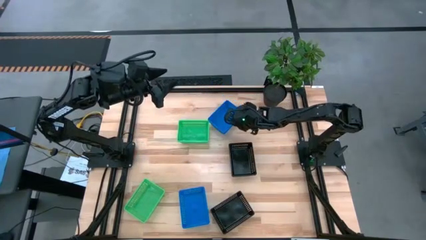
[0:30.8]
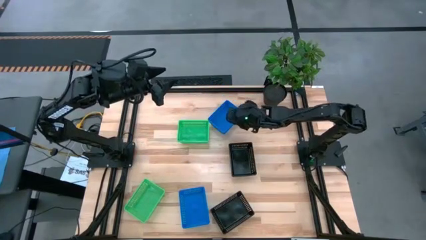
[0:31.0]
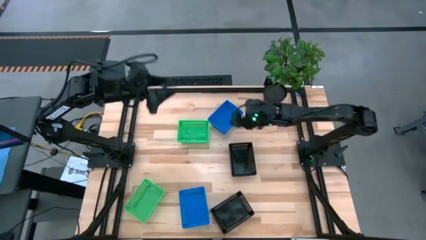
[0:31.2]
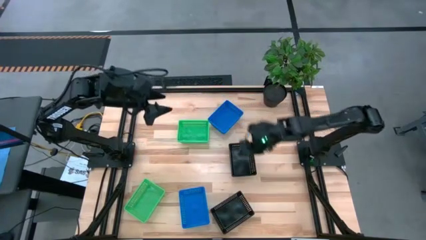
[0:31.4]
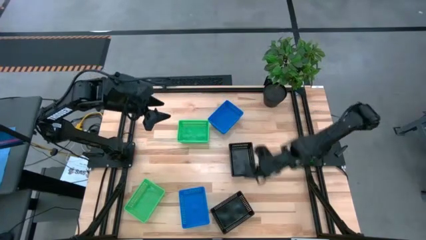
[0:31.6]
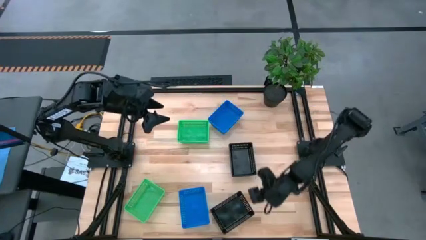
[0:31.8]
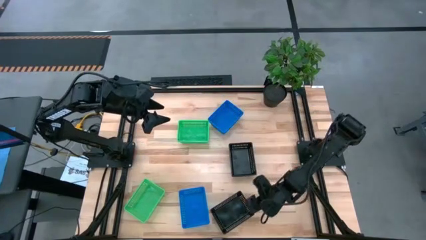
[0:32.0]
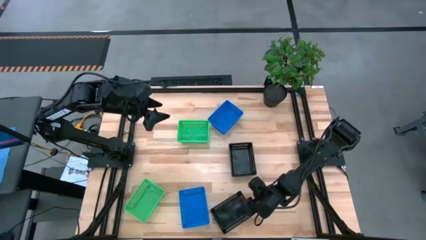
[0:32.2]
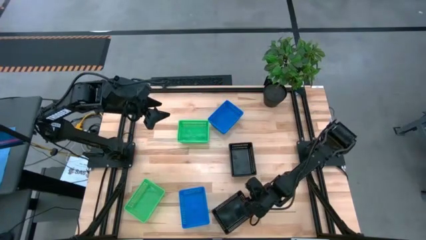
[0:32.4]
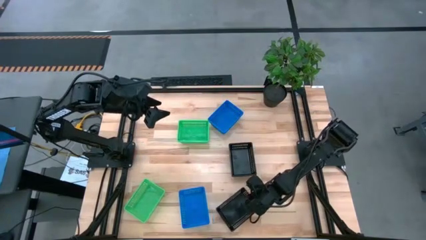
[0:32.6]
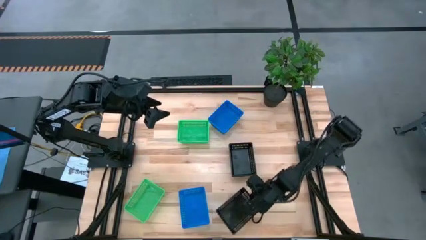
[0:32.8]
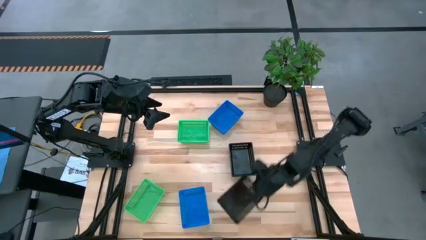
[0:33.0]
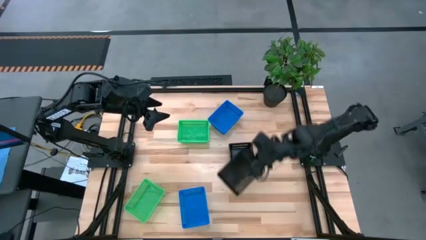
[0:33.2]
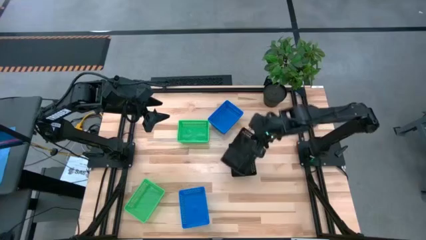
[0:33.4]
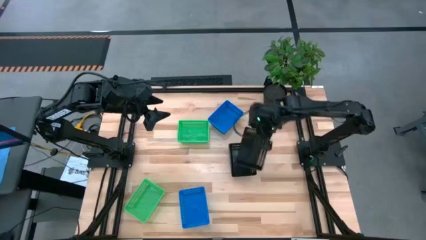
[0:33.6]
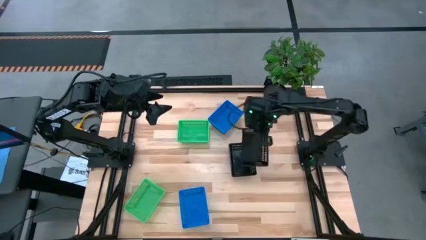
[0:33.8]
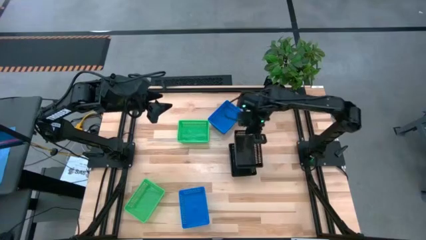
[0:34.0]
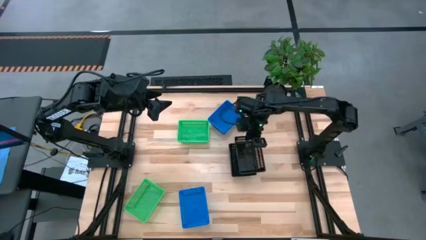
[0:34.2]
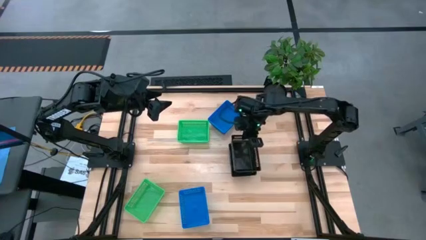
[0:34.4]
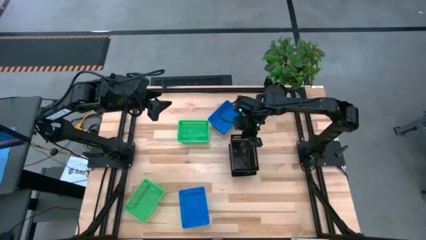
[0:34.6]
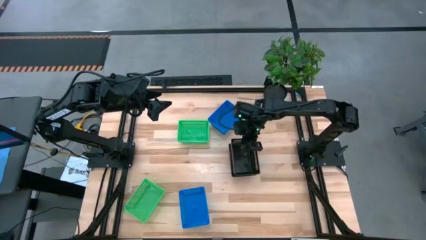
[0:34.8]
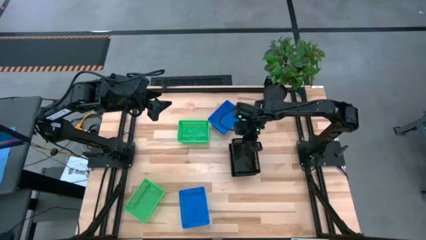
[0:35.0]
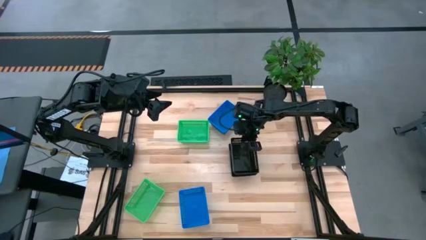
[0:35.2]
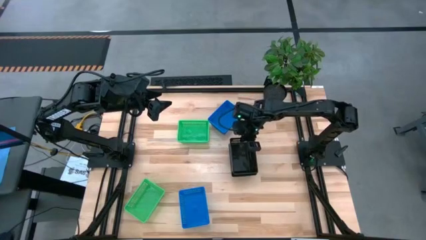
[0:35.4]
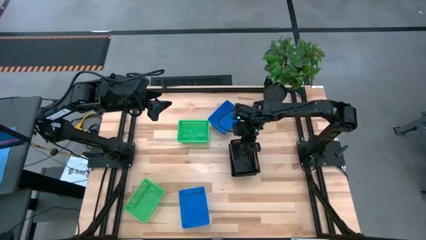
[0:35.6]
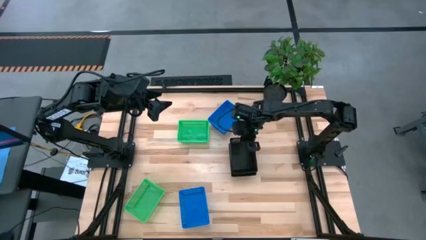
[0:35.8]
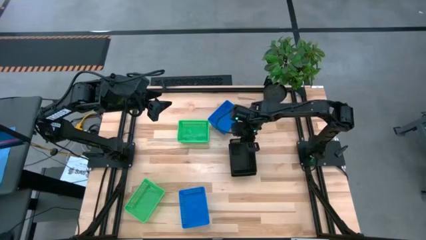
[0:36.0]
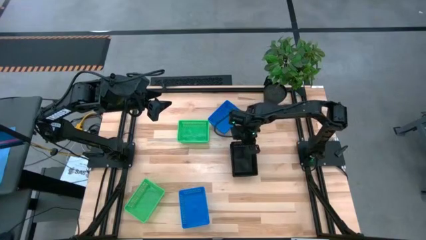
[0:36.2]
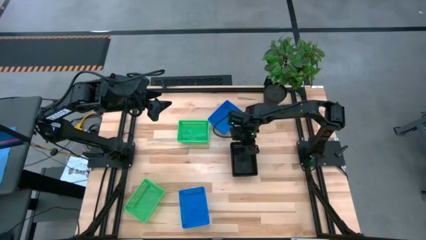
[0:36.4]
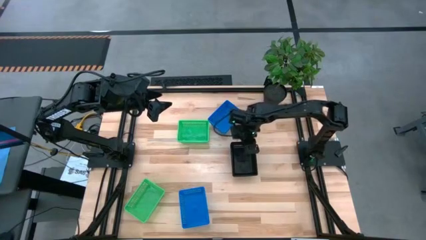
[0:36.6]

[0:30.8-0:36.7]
Stack the bottom black bin on the top black bin

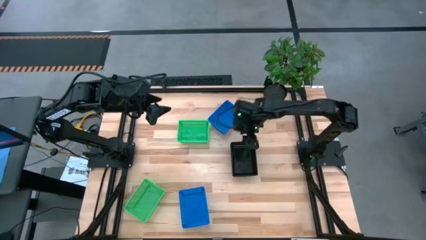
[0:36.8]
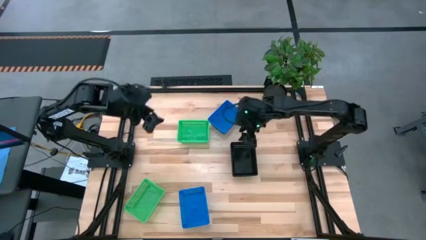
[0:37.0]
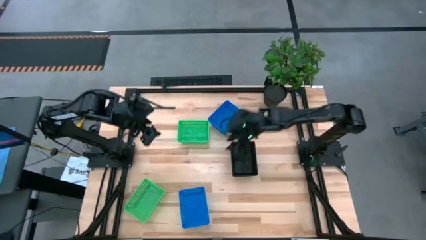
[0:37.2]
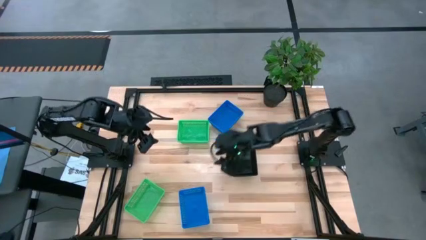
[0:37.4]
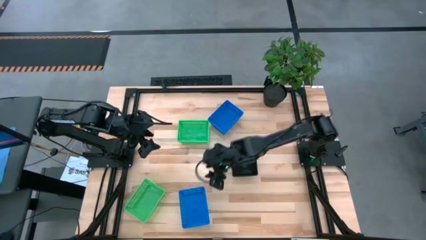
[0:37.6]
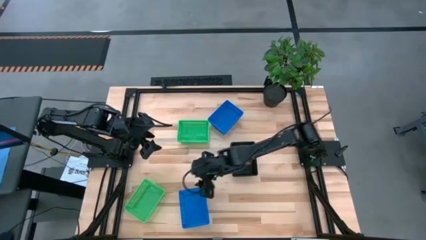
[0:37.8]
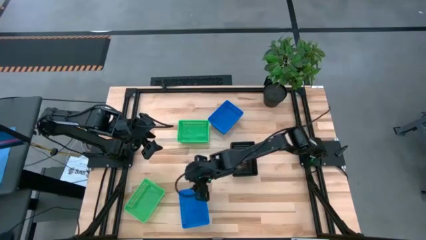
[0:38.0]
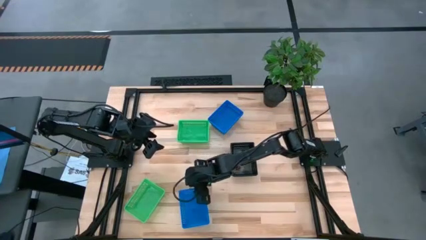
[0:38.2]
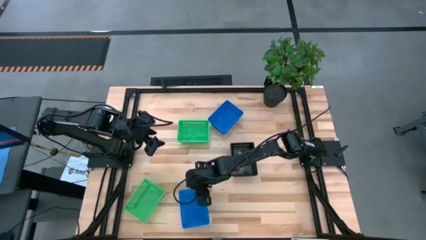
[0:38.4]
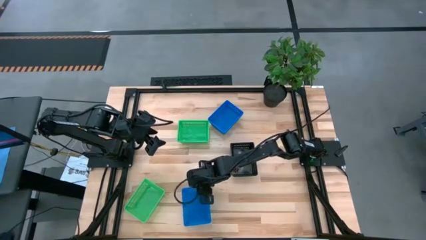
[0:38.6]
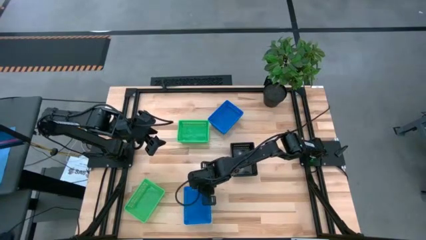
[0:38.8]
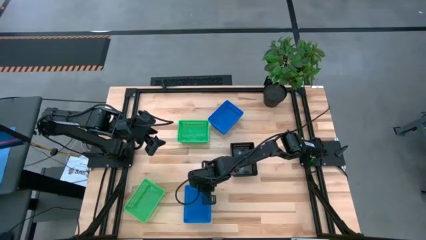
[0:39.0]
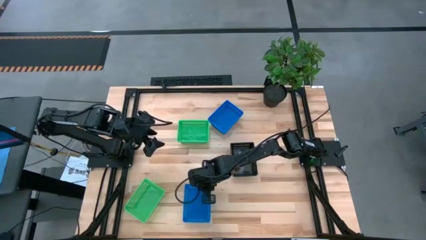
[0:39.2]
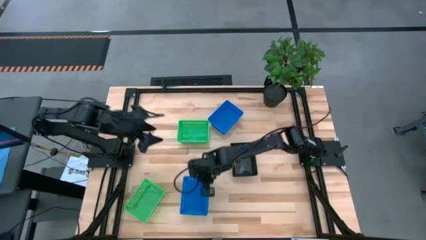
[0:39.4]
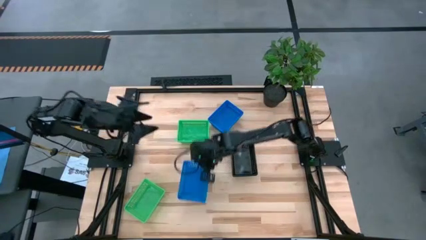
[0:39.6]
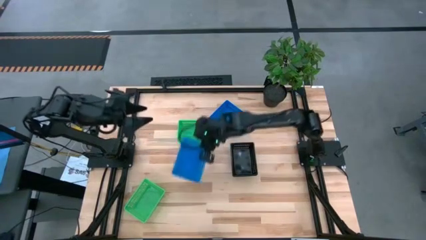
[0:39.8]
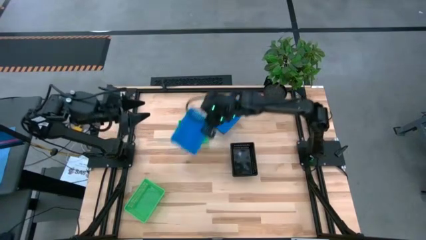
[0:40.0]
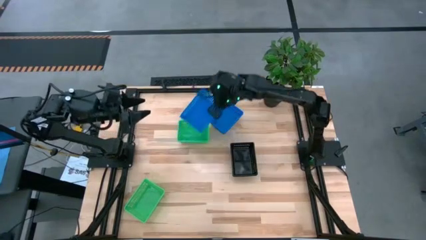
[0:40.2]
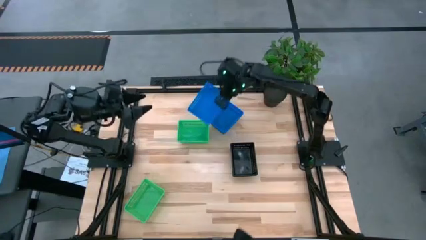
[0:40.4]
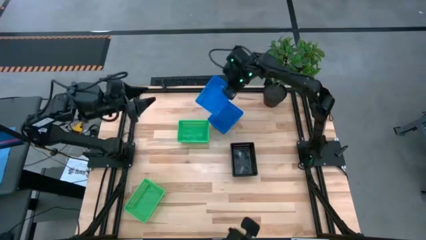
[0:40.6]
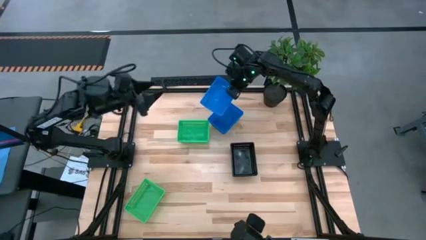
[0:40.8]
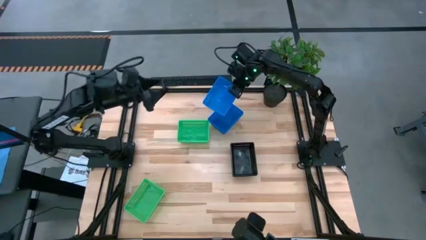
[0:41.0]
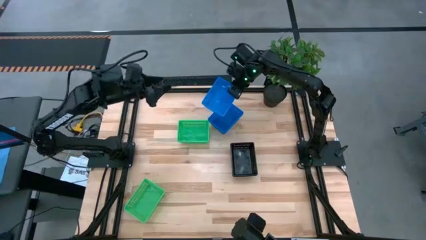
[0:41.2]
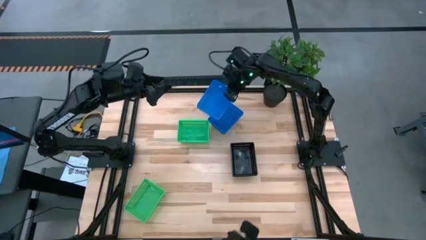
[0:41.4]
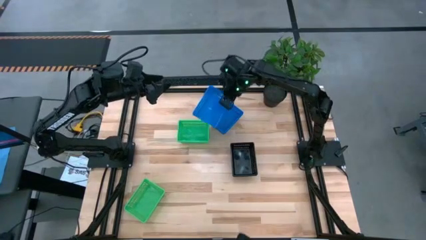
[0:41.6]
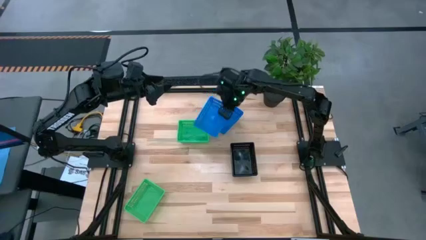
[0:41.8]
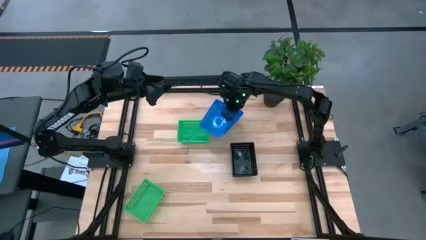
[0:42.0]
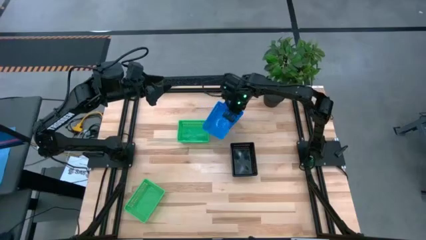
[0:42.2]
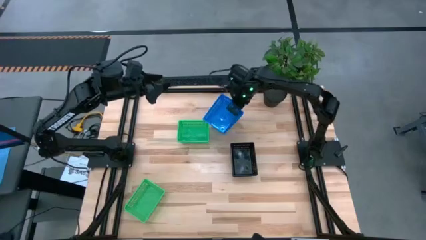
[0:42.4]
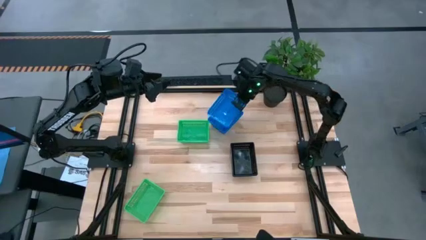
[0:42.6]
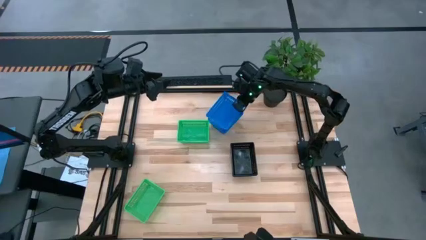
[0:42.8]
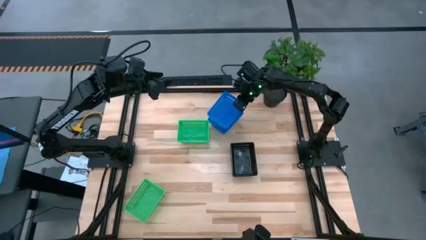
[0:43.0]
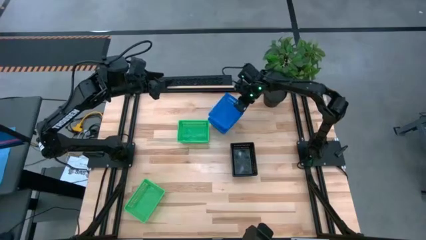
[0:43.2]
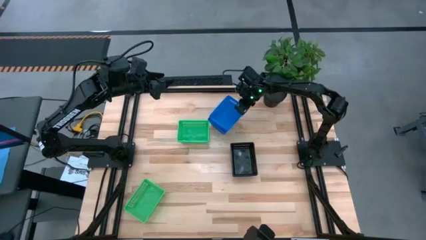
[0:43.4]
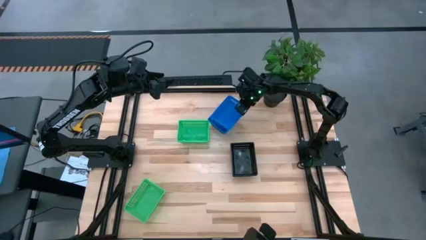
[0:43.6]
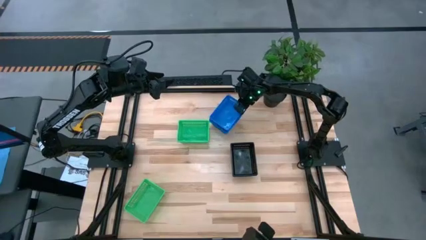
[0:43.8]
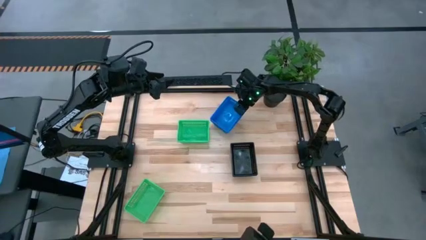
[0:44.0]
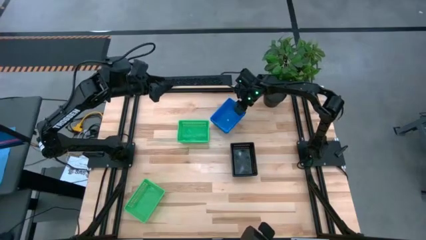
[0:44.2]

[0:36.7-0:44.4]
Stack the bottom blue bin on the top blue bin

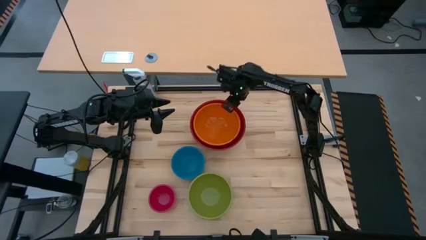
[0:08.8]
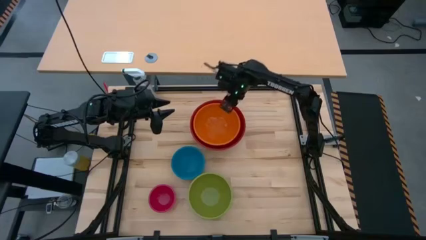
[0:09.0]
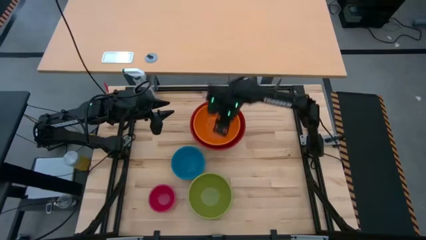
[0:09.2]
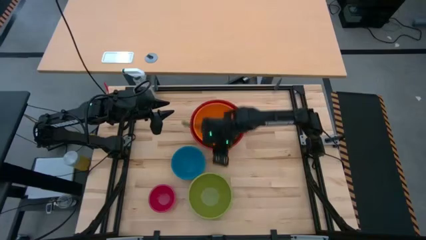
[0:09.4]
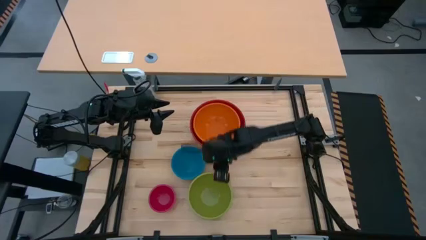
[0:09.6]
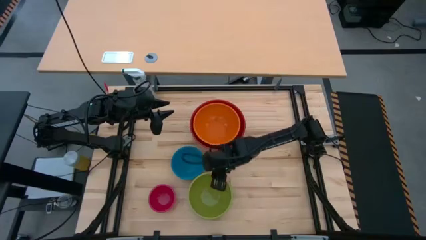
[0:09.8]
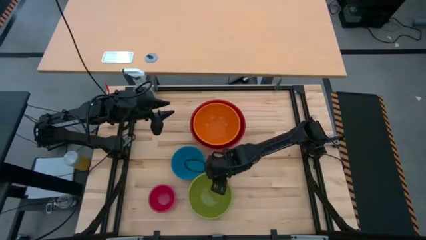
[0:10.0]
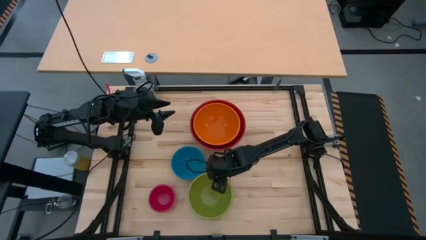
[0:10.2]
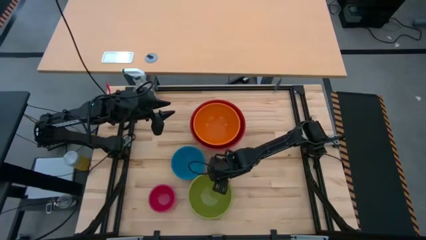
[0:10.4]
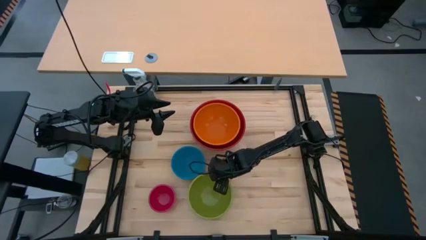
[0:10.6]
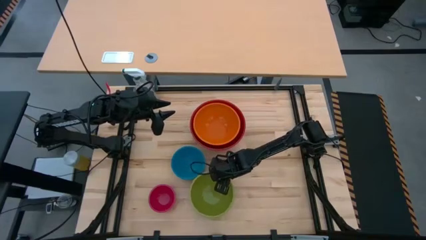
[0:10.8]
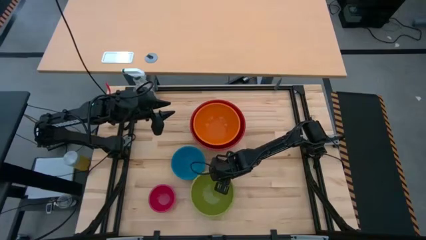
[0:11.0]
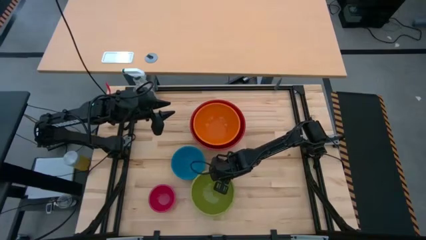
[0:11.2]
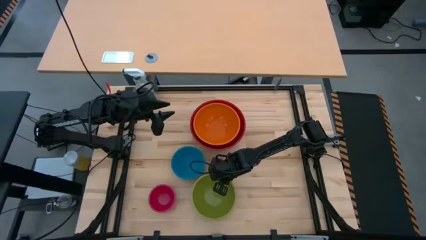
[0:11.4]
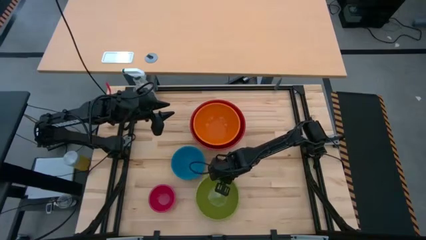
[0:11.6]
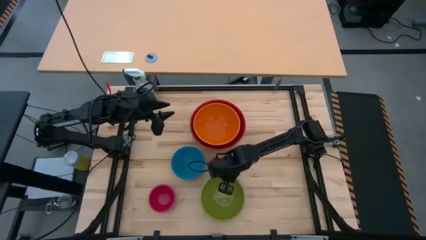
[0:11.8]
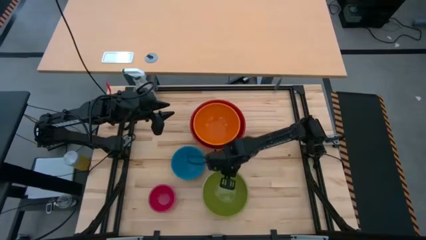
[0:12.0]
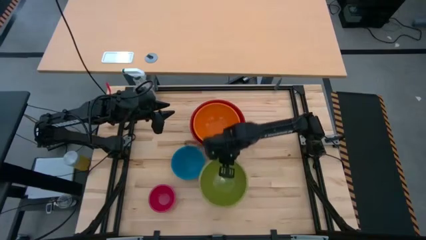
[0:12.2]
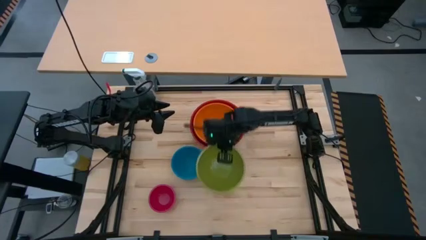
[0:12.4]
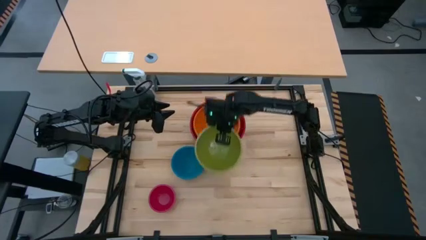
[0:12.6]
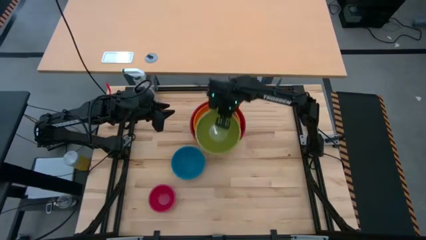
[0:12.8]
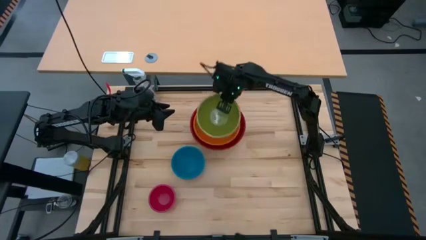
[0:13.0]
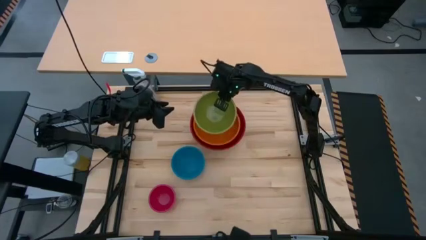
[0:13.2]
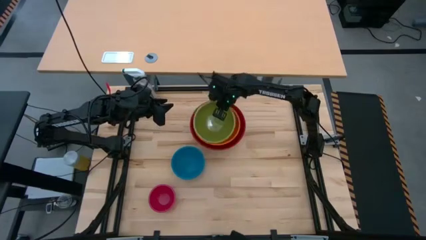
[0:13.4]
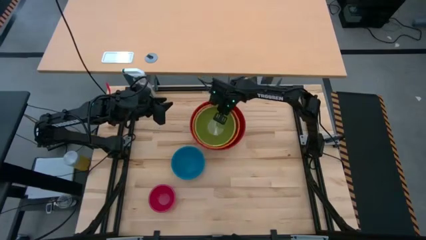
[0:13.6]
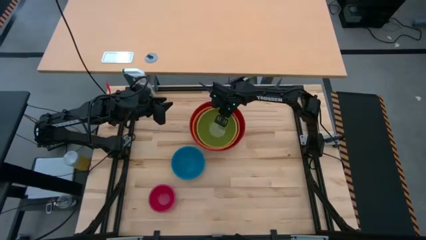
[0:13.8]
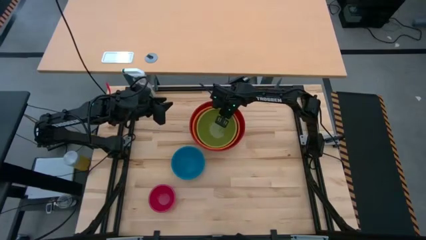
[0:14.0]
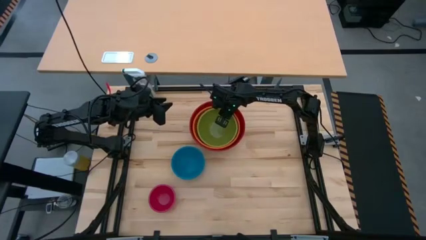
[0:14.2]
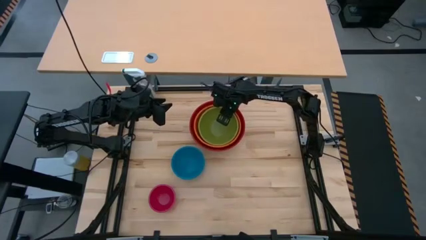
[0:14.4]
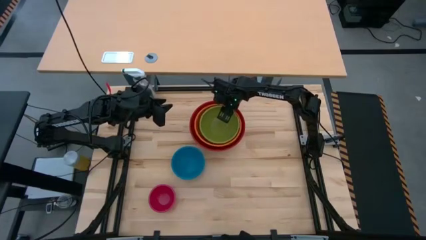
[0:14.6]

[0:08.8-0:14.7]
Stack the green bowl on the orange bowl
